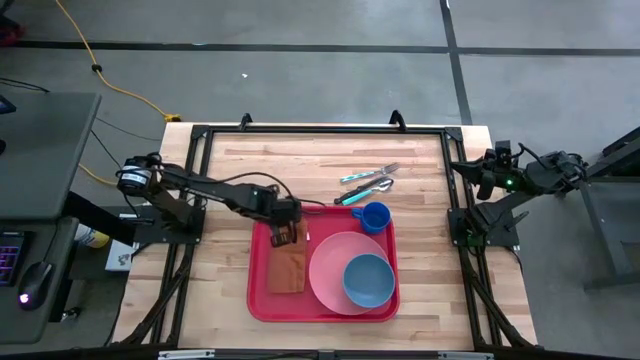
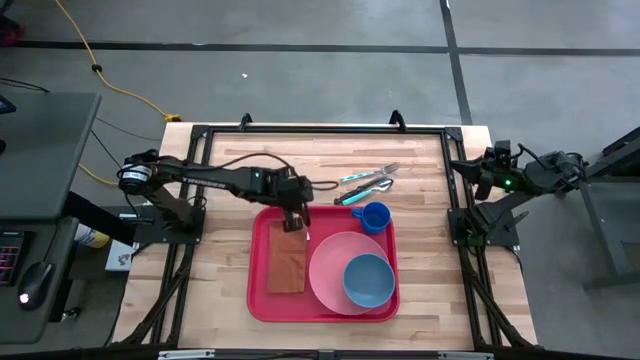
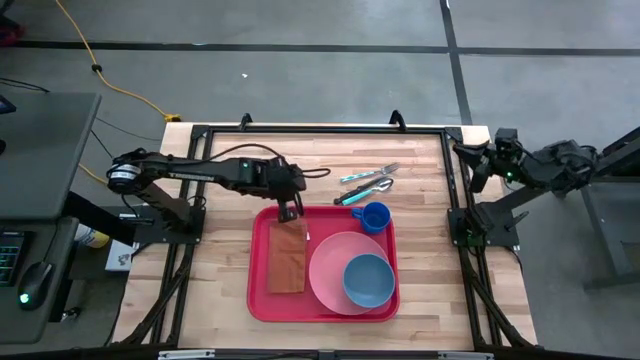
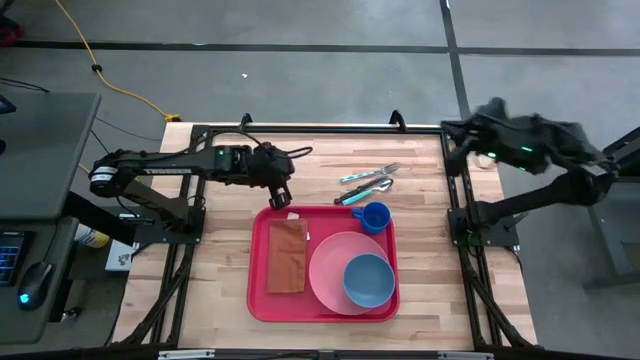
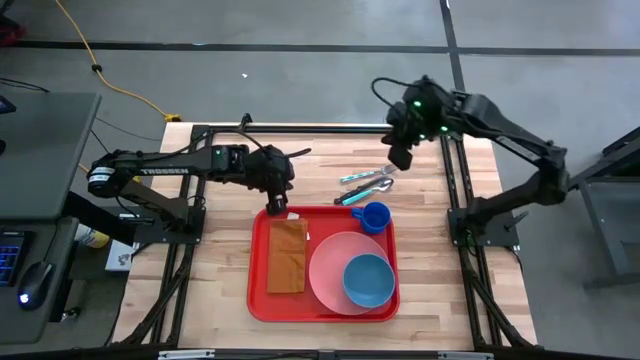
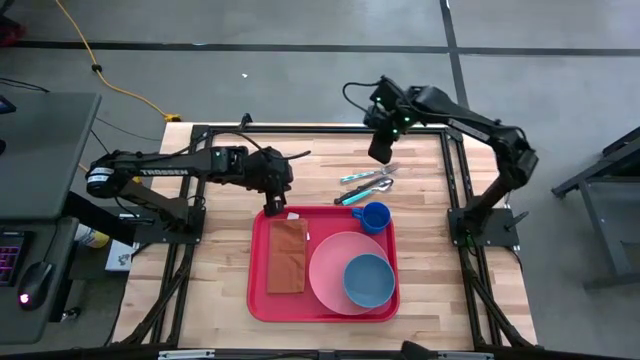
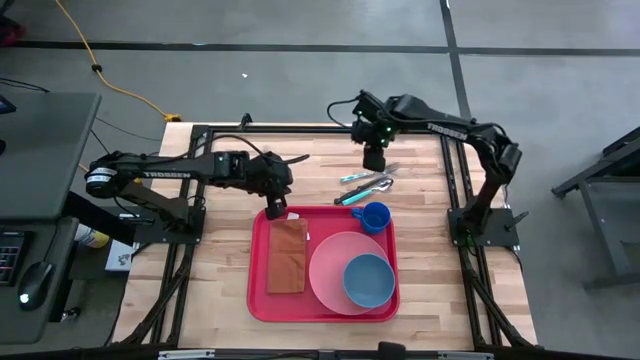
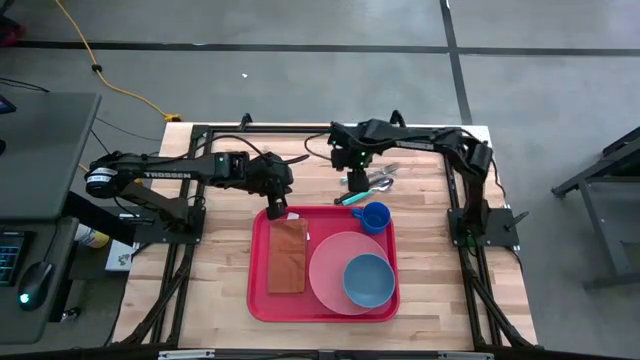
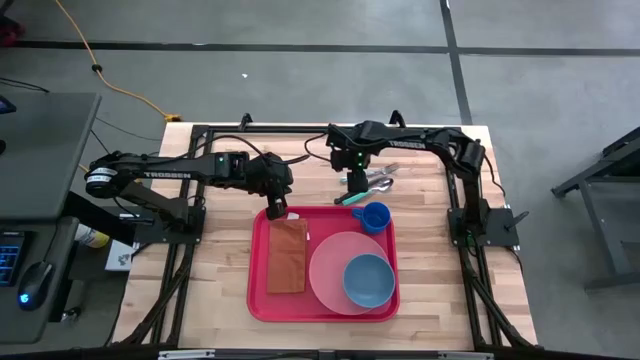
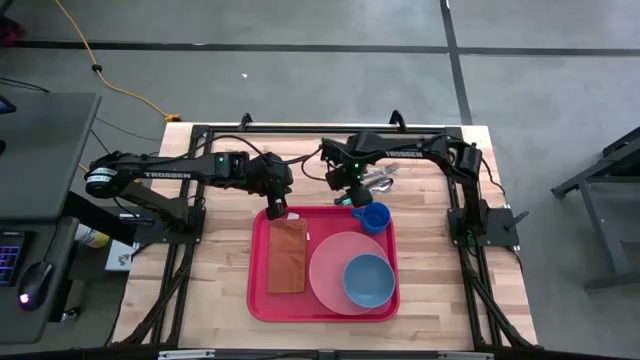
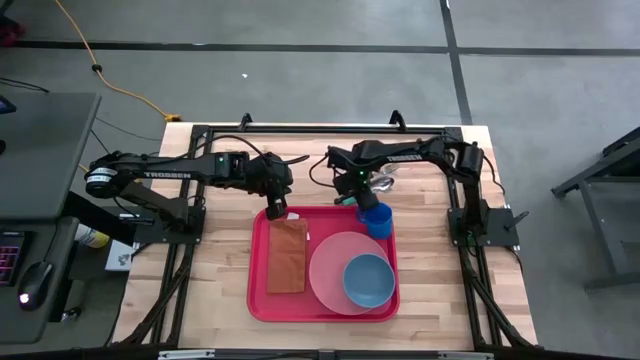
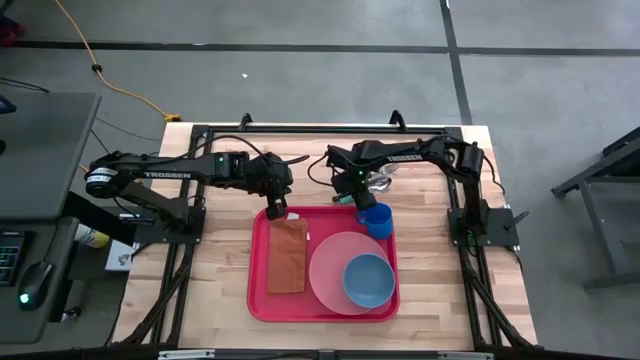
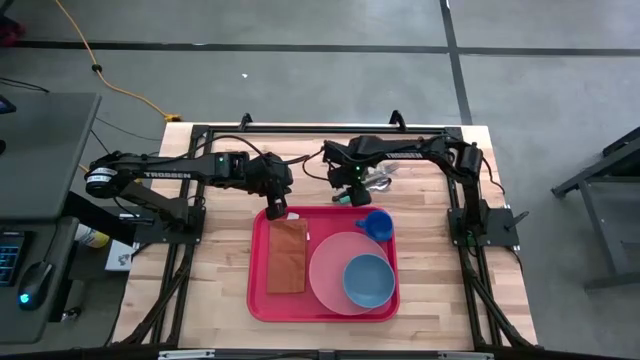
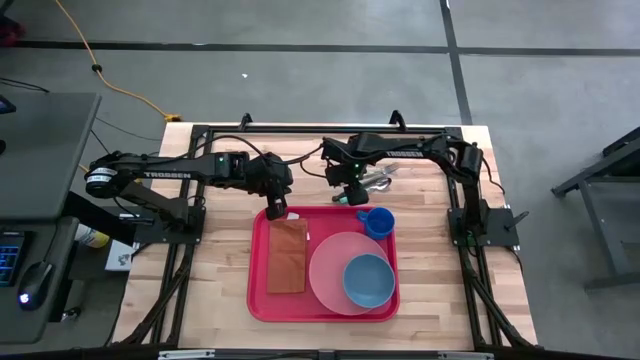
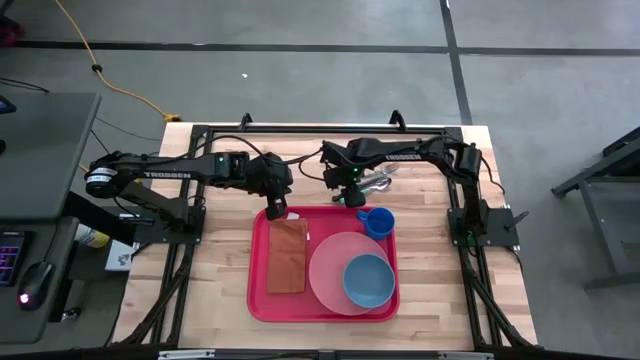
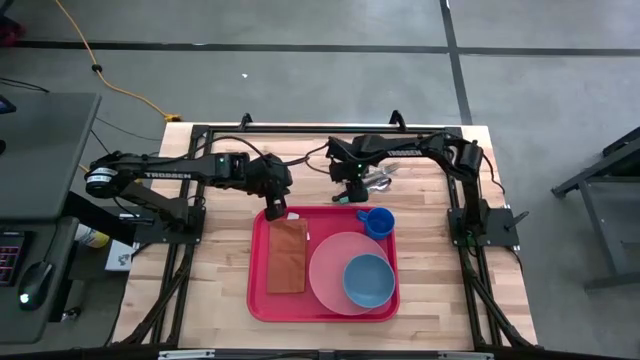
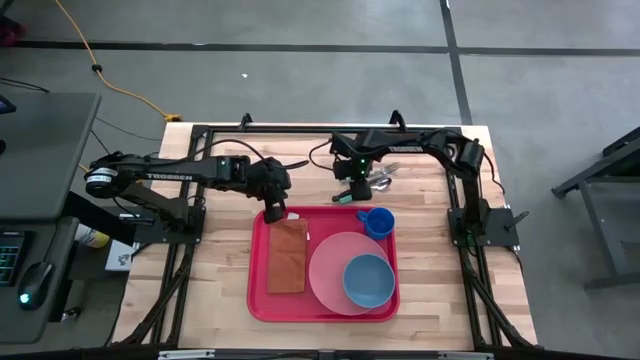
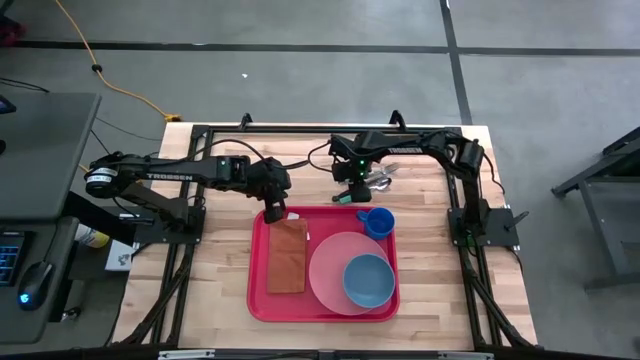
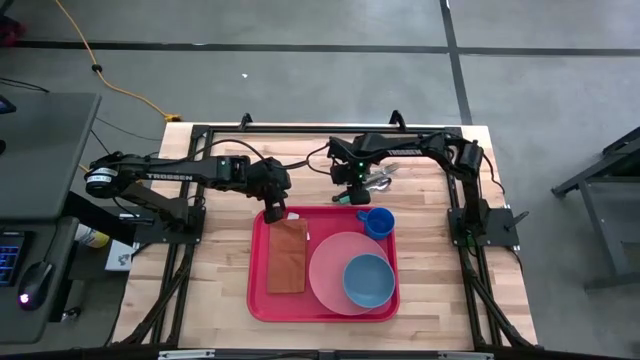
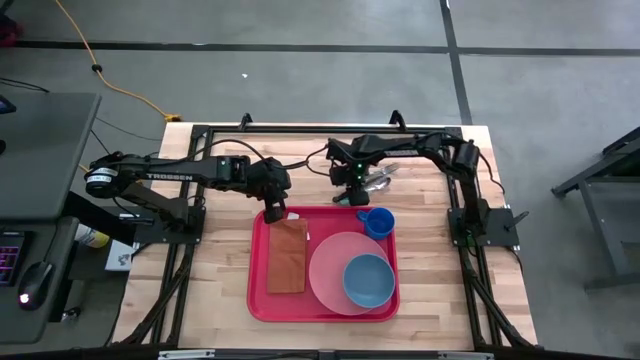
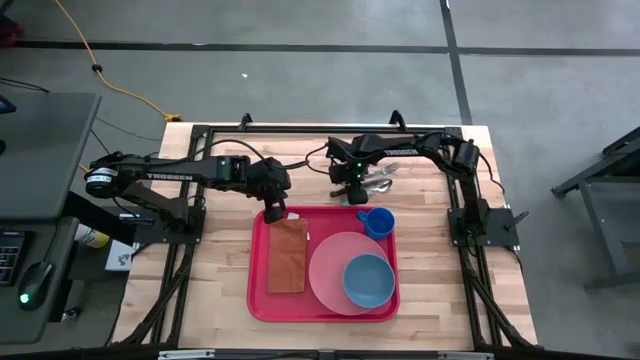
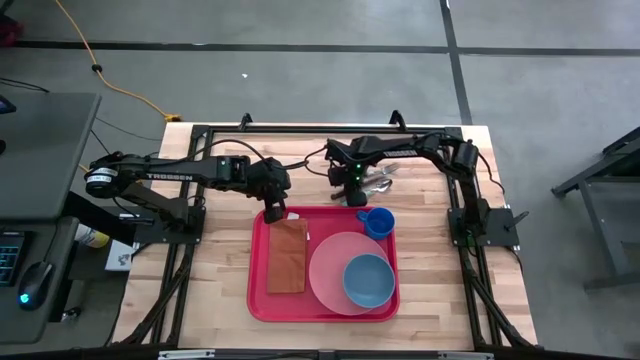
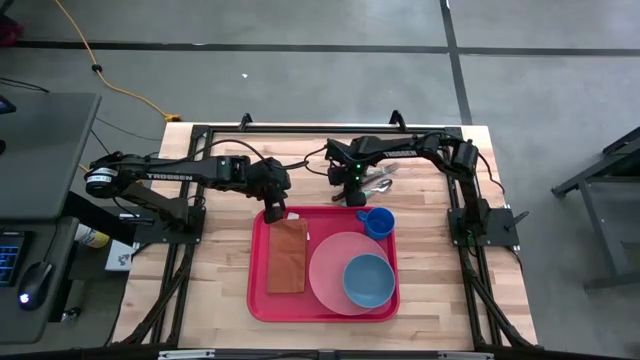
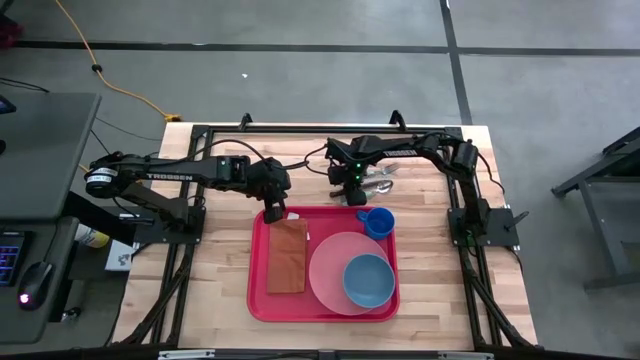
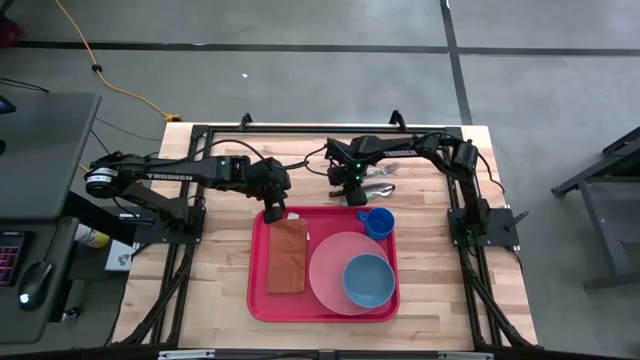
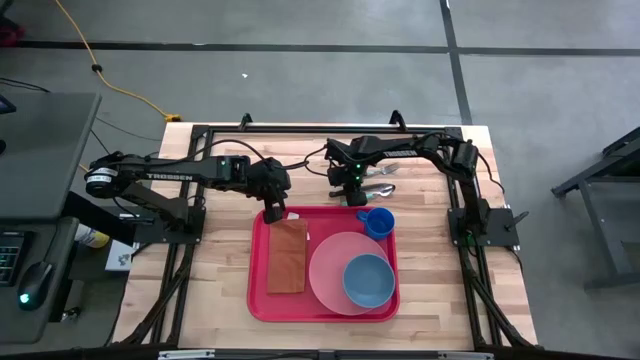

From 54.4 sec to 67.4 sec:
Task: Set up tray
Put the black knife on top of the orange napkin on the serving tray

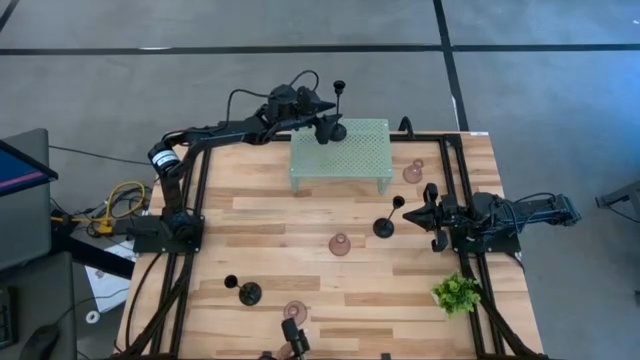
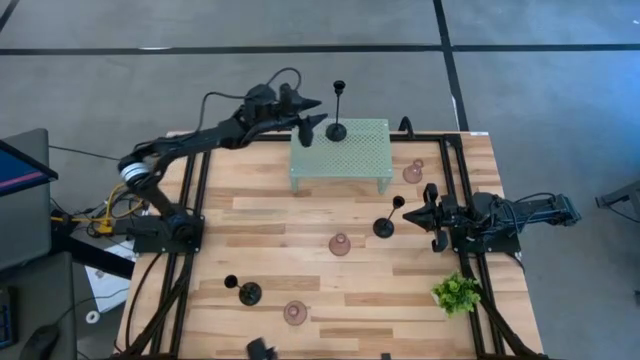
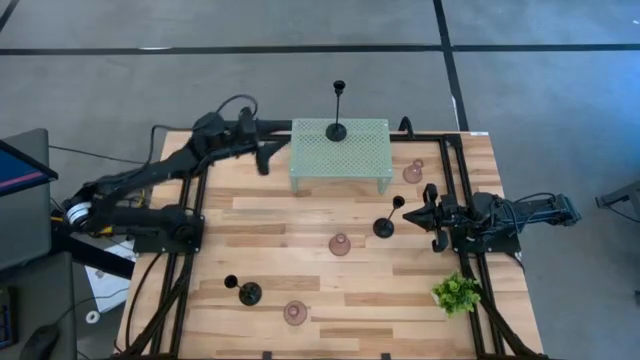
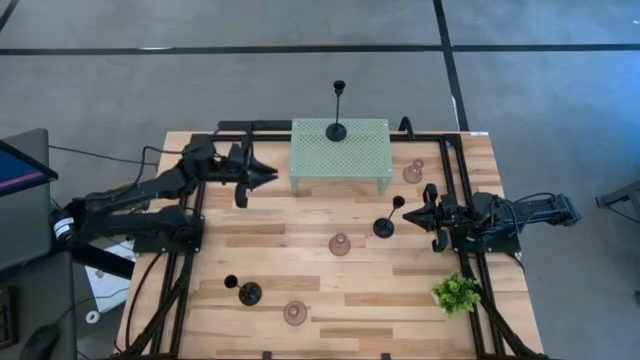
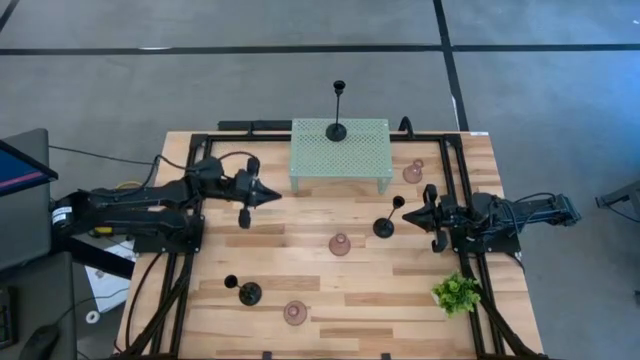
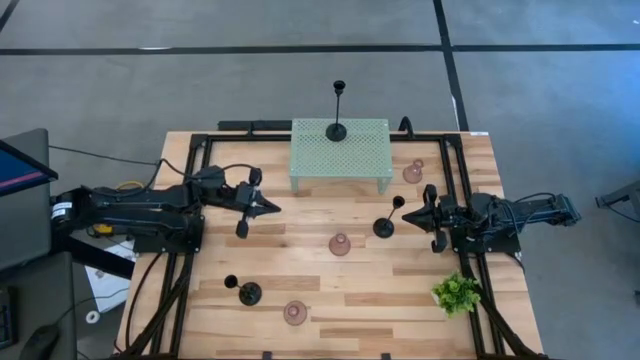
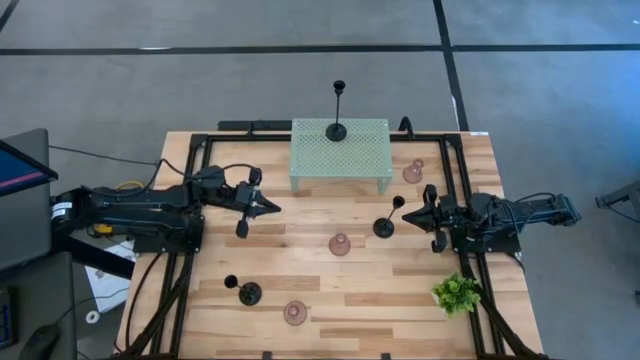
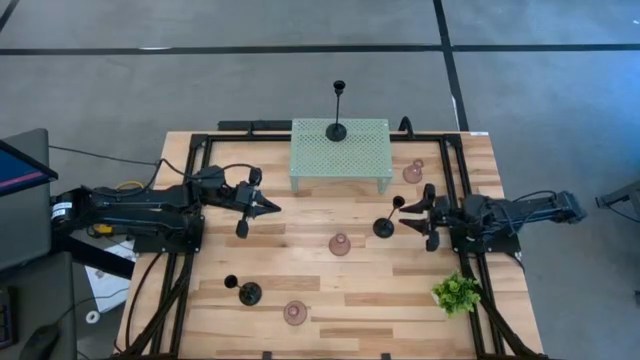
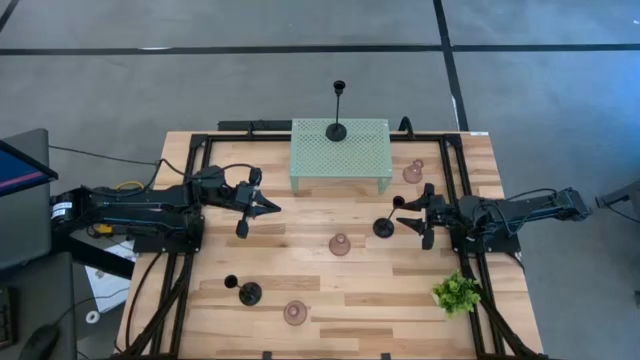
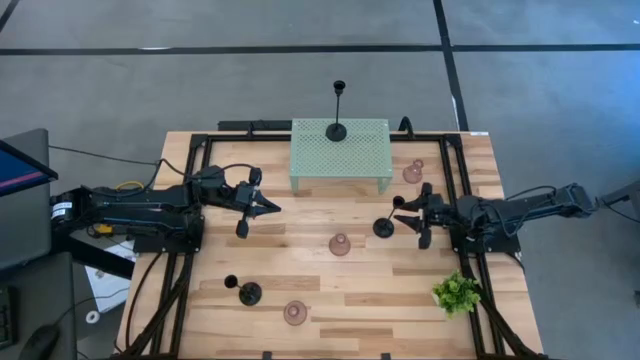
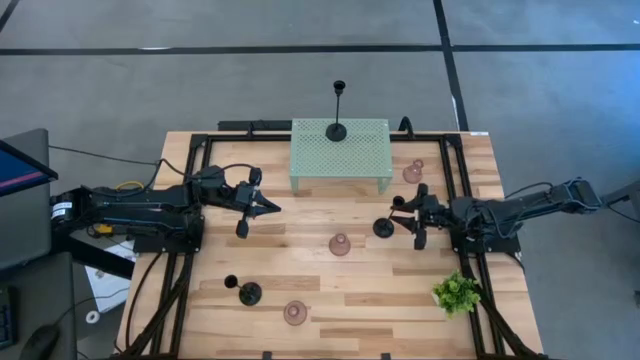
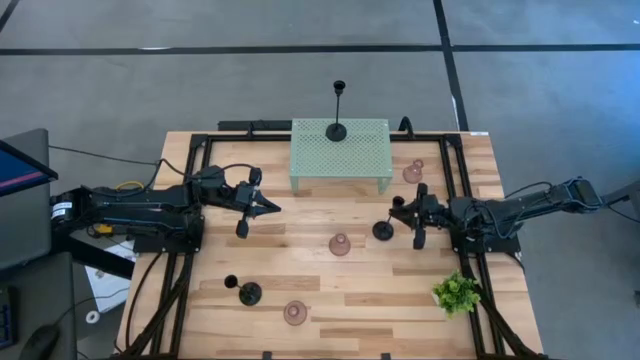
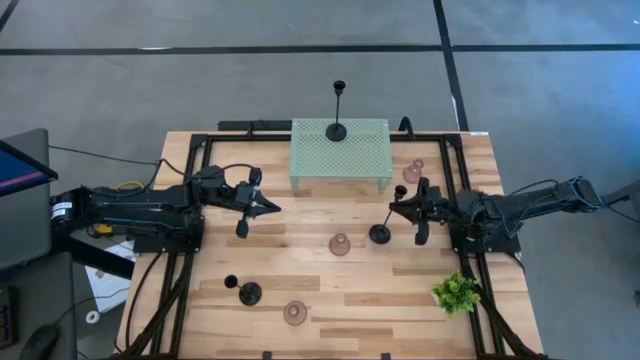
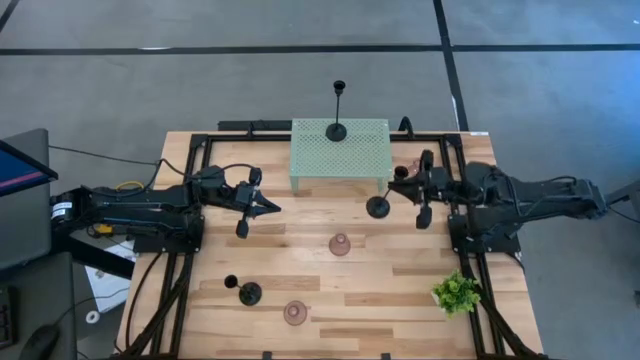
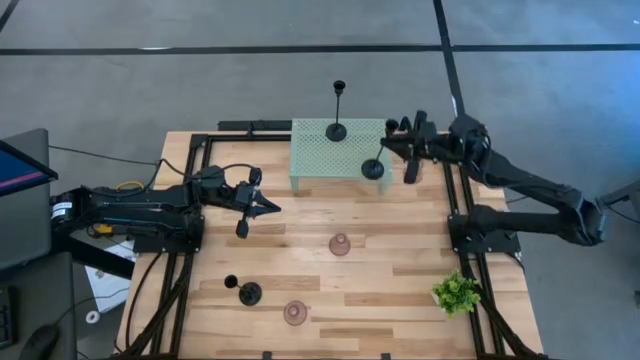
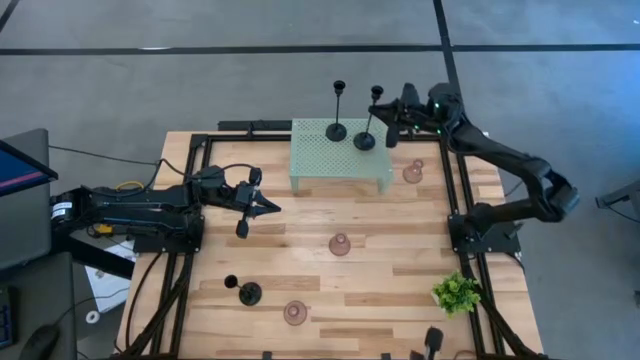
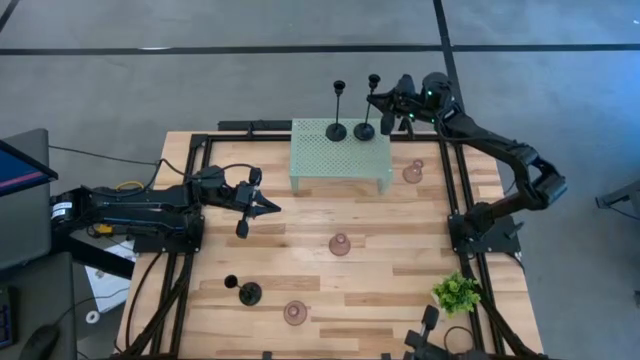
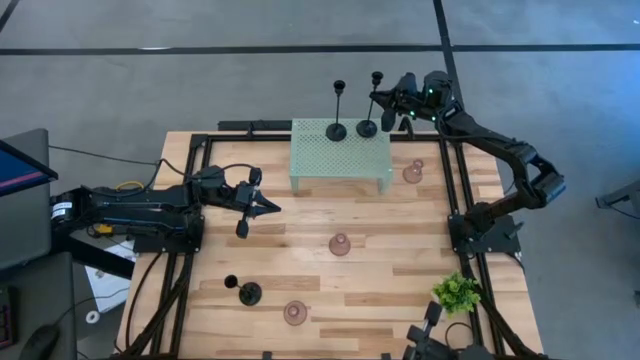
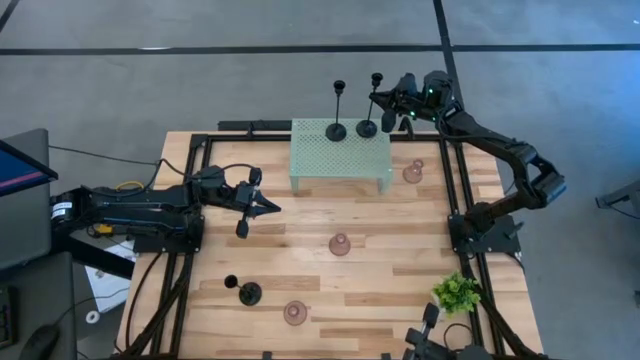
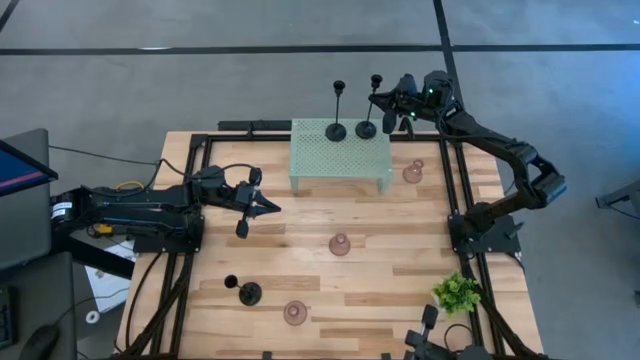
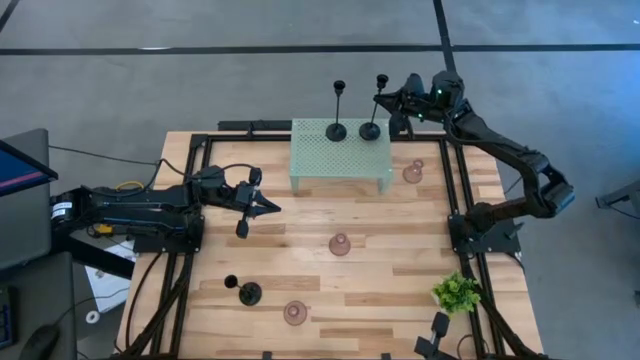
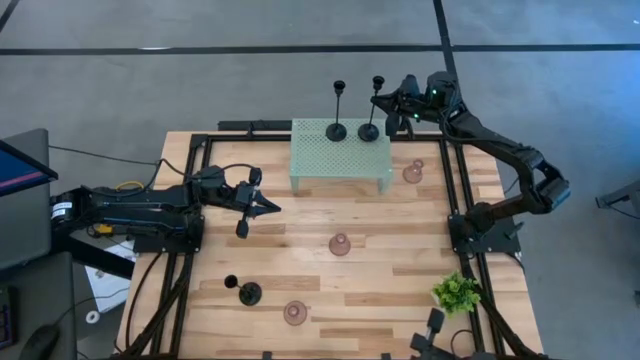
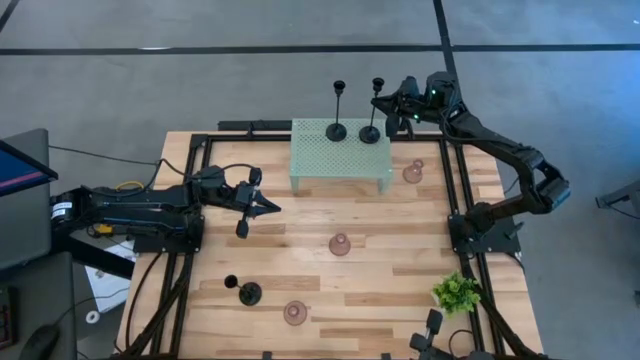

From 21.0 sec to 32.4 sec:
Task: Pick & Place candle stick holders
Put the top black candle holder on the shelf
